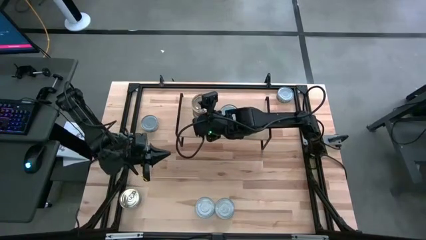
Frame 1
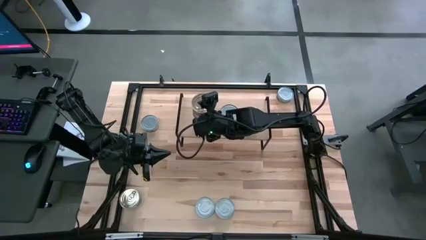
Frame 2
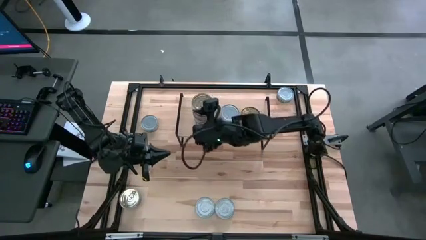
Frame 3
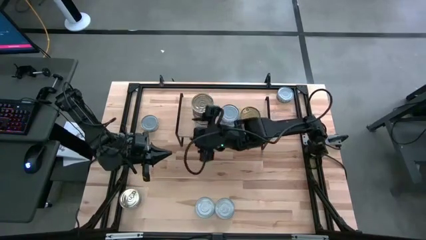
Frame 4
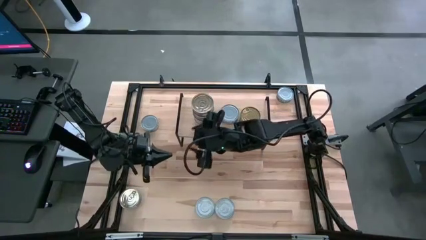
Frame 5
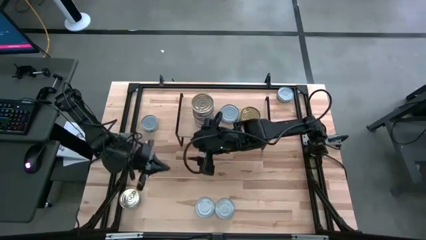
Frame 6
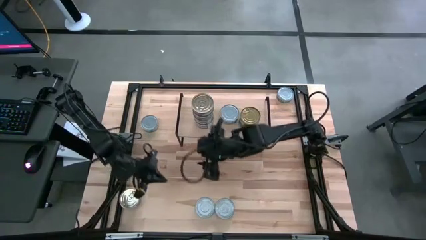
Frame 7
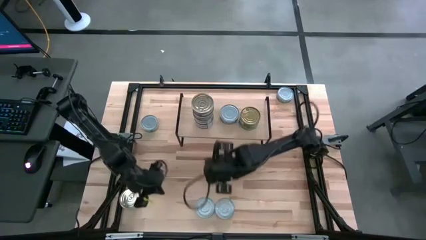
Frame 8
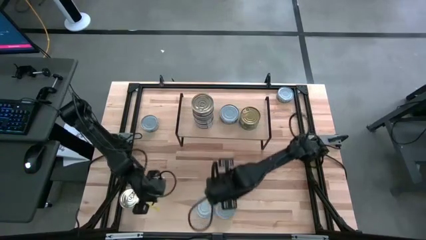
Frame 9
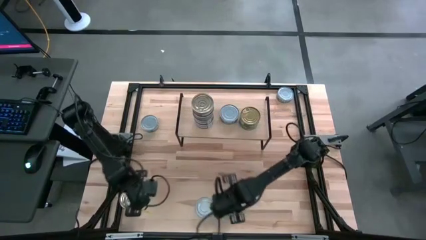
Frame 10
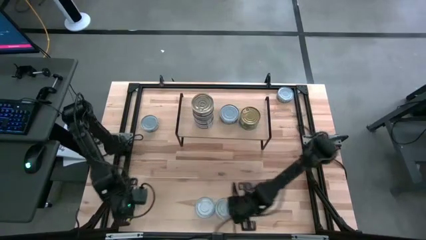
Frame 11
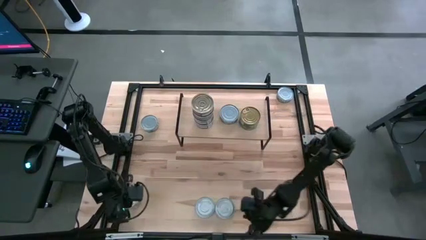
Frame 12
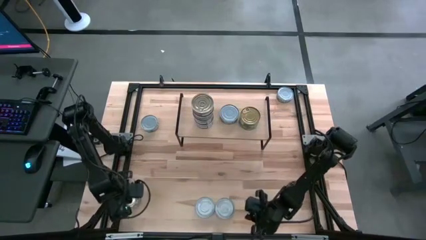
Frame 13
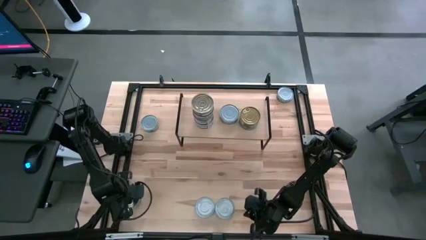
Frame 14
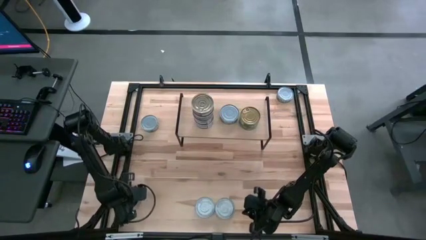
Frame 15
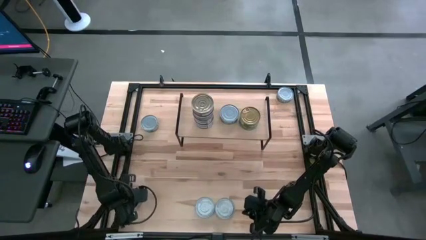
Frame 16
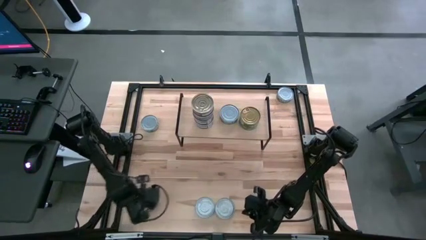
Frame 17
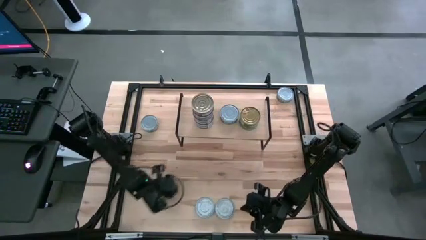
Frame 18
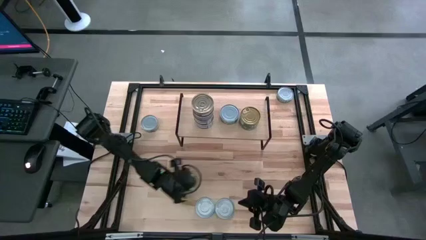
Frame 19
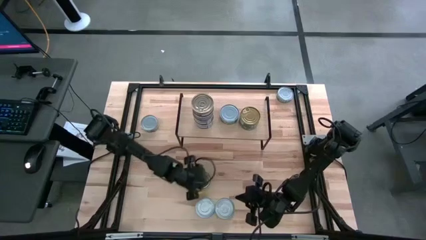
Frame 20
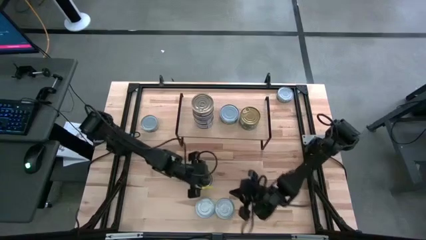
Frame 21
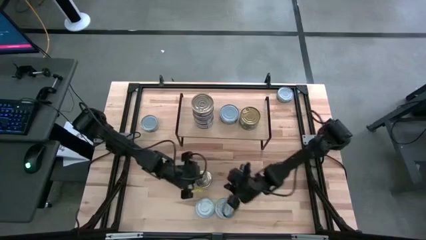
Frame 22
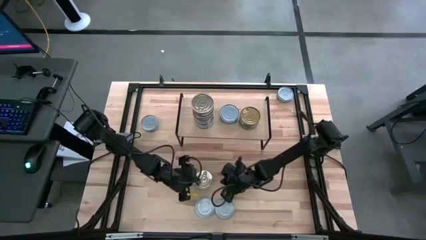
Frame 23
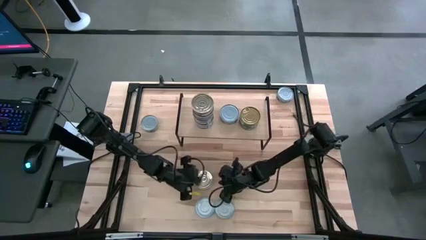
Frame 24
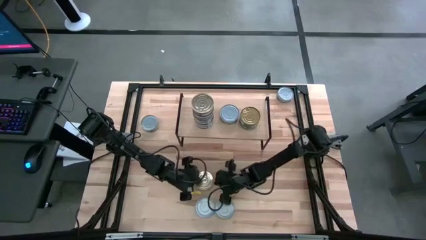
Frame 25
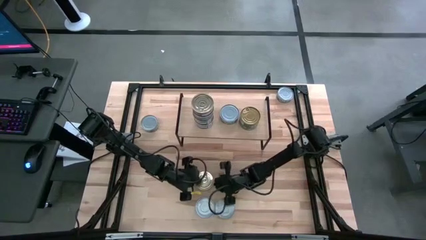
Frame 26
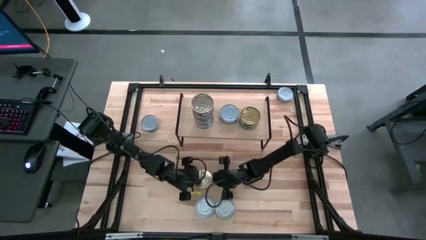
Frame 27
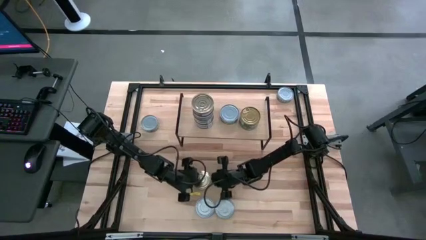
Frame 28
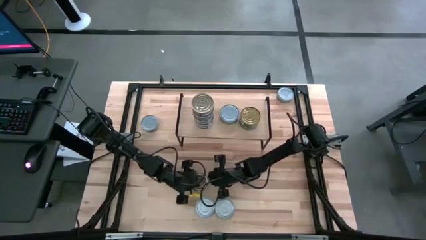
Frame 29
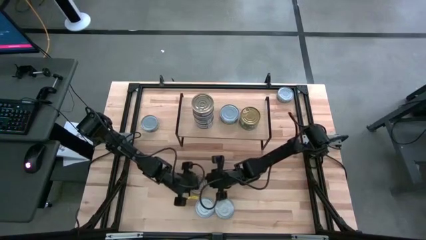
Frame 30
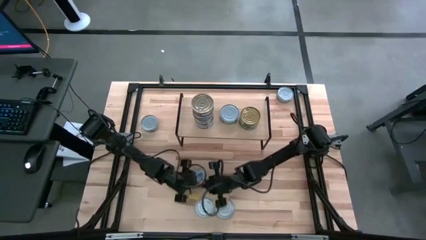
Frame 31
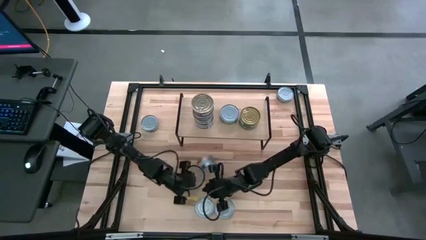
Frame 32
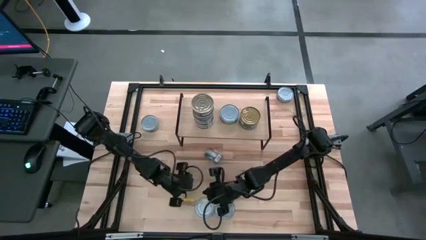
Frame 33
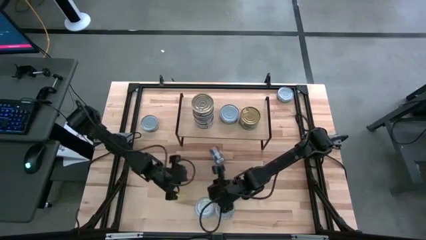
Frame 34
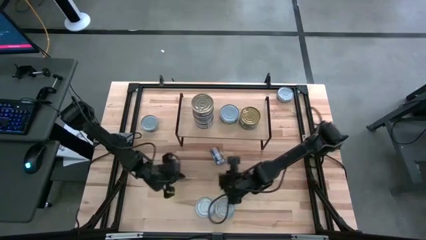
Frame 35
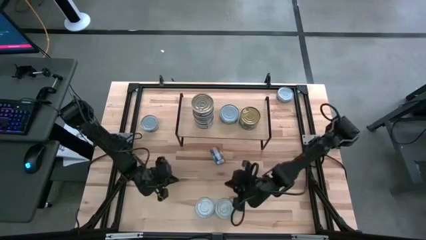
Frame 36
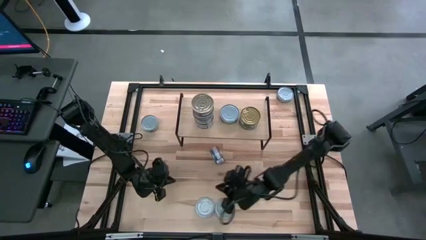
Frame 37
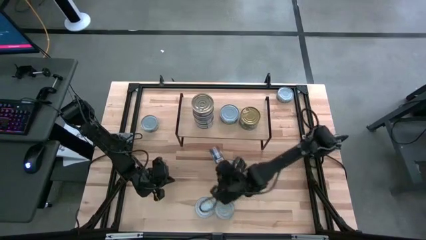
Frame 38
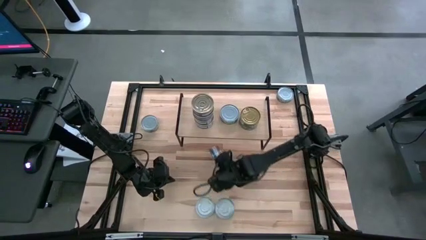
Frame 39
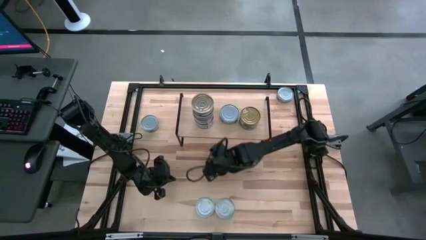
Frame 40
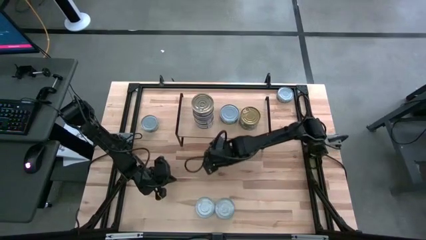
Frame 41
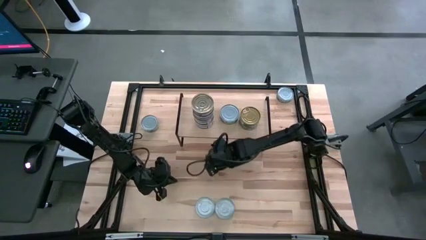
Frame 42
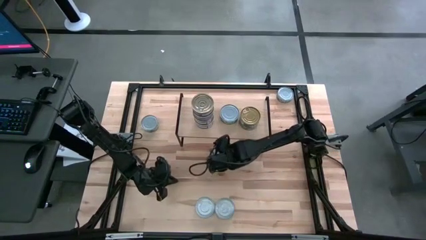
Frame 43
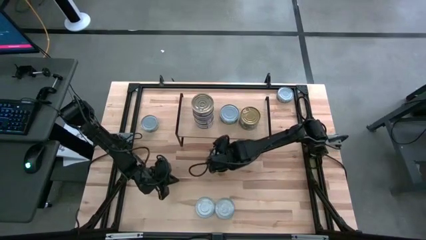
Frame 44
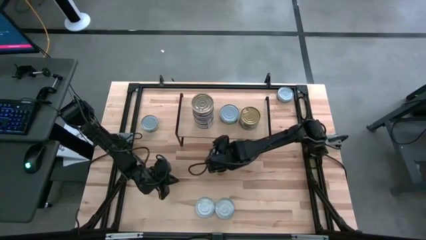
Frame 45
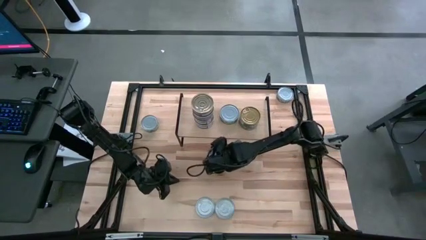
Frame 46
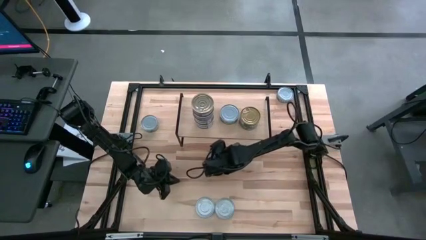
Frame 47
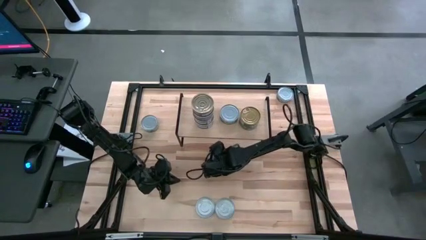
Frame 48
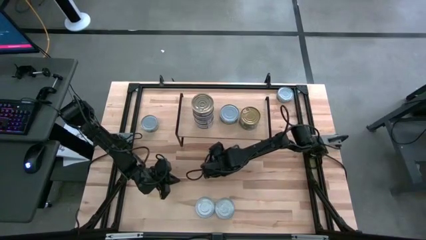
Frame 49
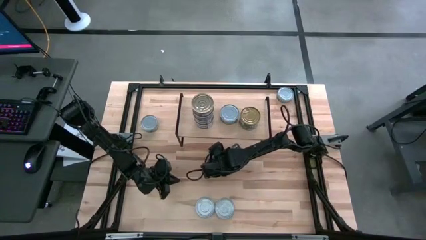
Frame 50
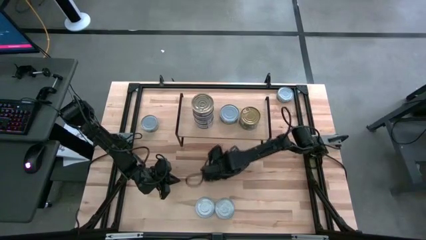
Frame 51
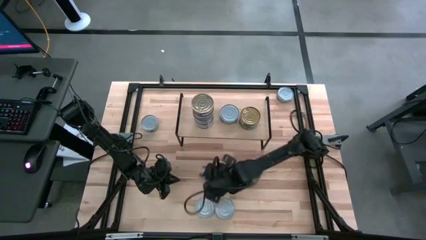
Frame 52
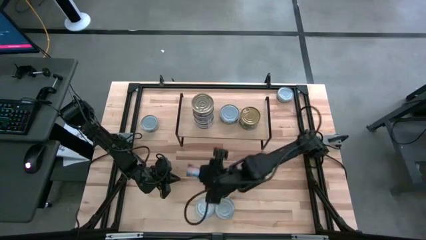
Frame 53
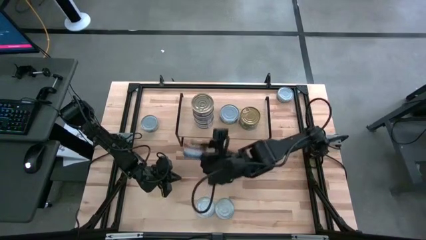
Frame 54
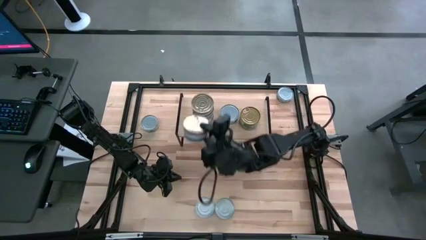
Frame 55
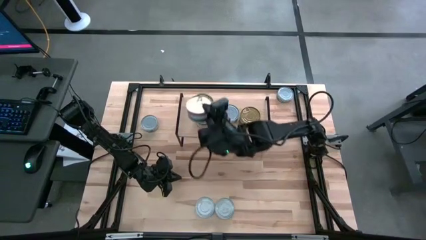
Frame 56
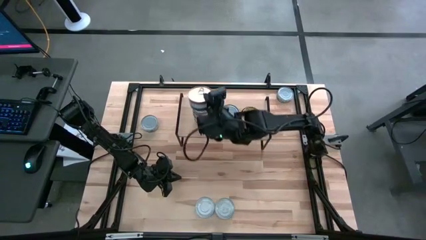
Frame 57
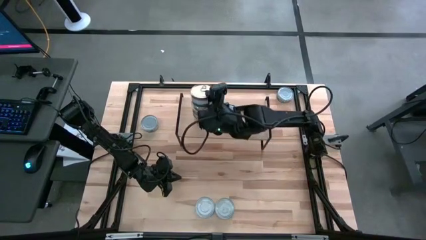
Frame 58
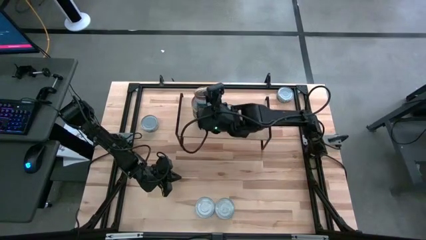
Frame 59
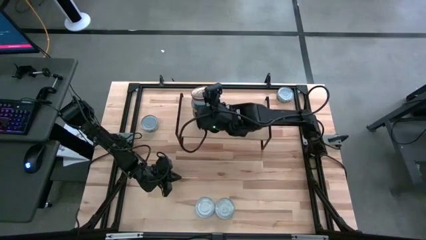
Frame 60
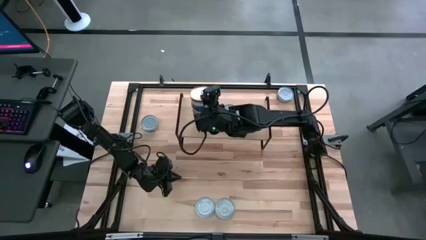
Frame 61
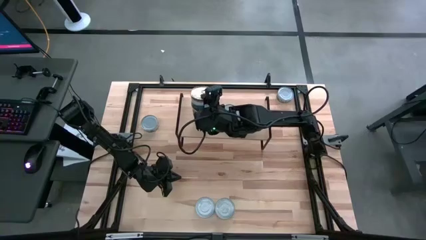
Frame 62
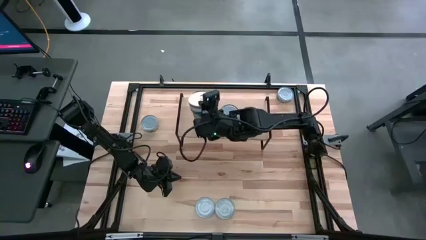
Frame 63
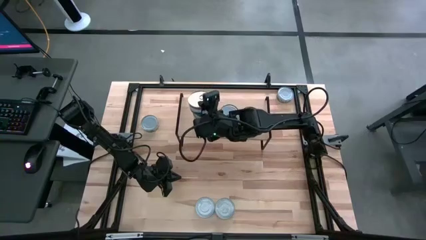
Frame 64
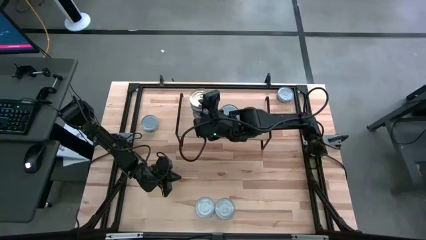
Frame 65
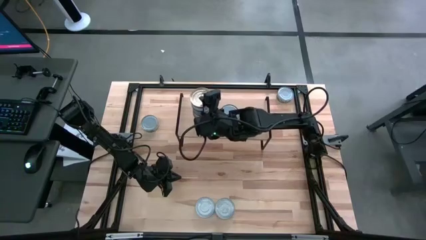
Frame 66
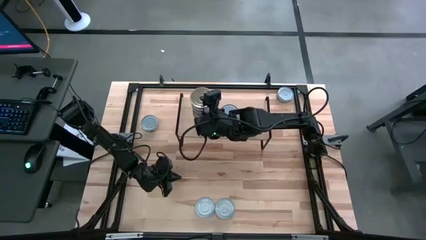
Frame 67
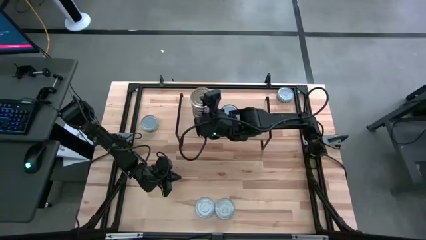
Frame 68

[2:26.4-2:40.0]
Task: Stack canned seafood by type on shelf
Stack the blue-pink tuna can on top of the blue-pink tuna can on the shelf
